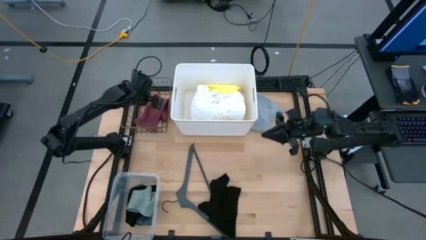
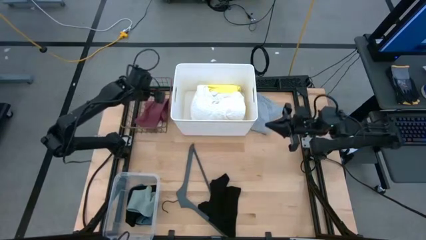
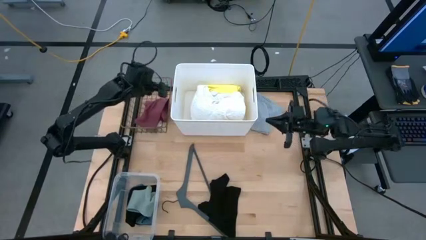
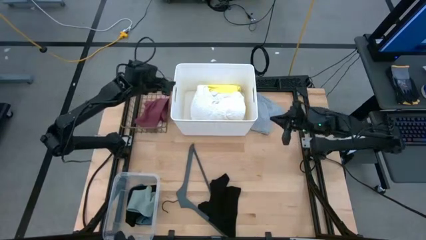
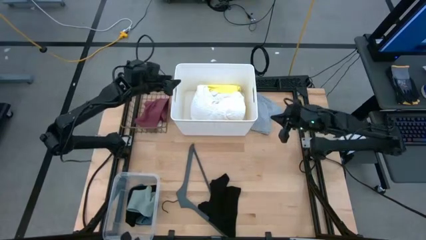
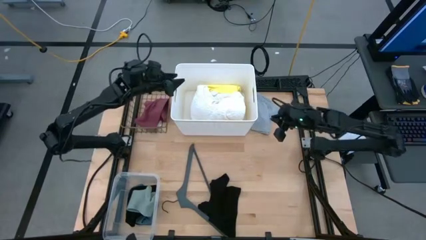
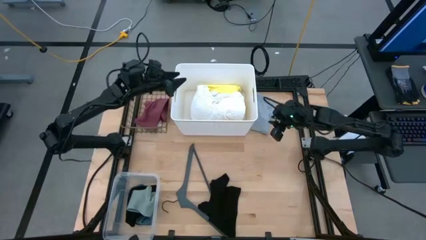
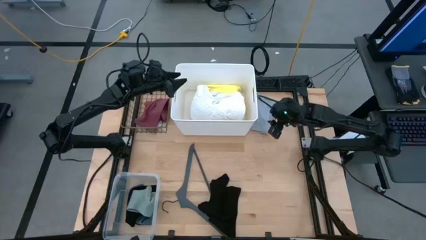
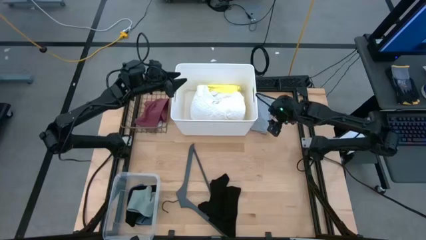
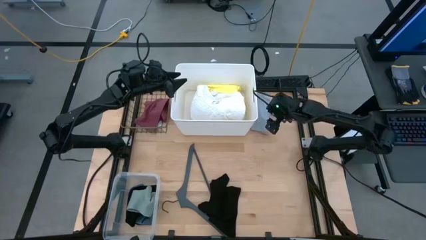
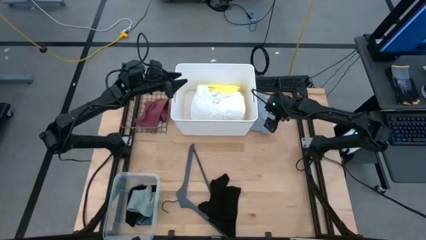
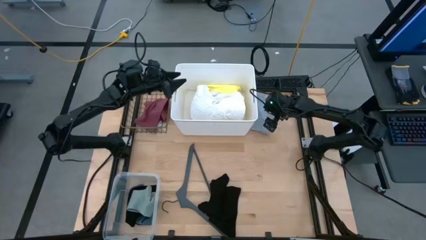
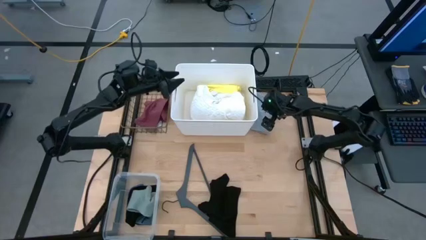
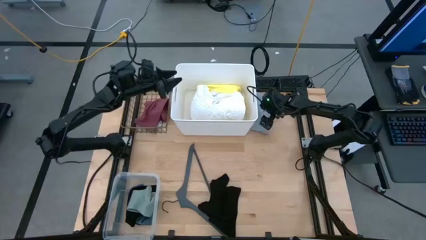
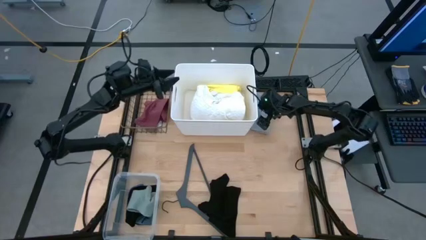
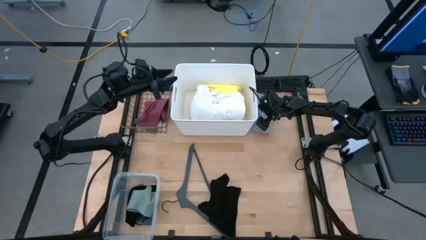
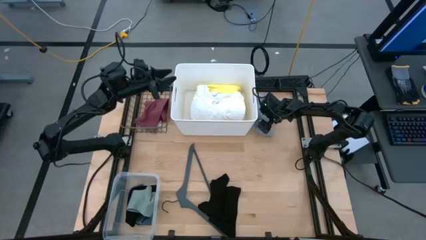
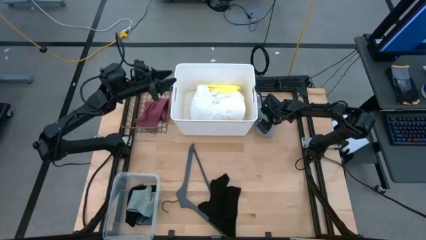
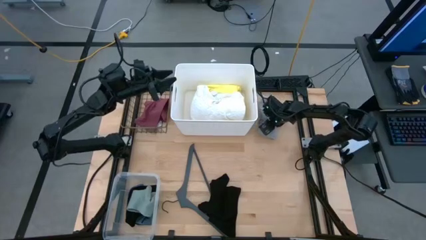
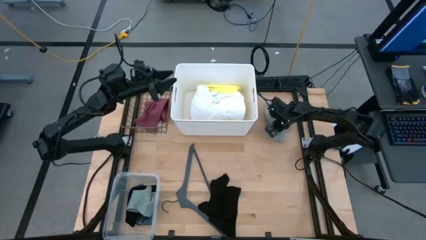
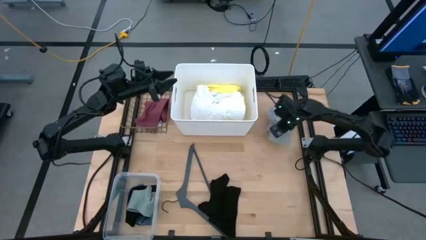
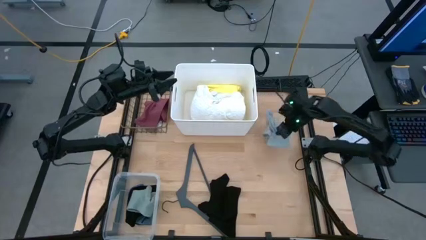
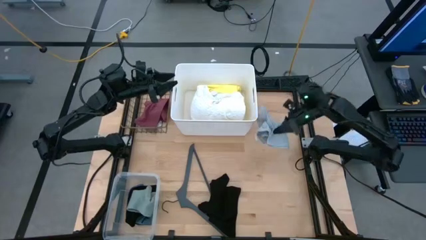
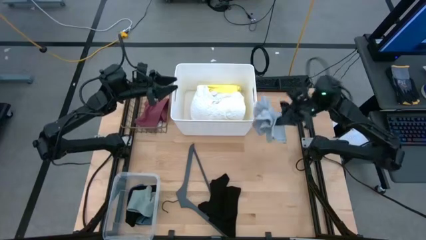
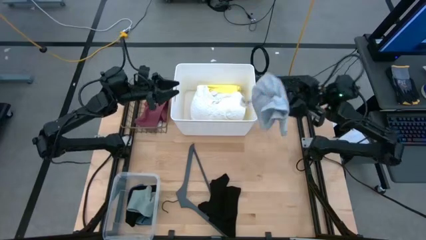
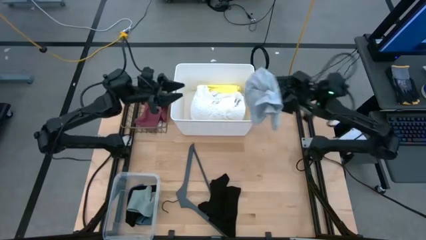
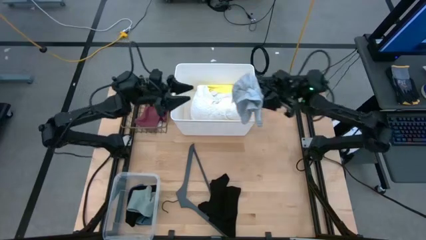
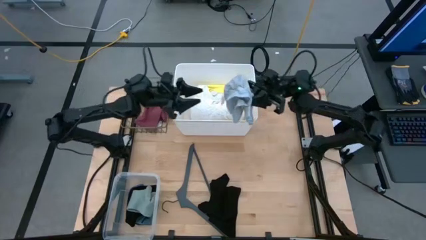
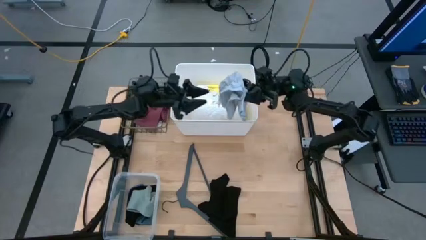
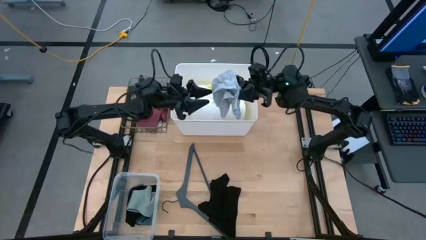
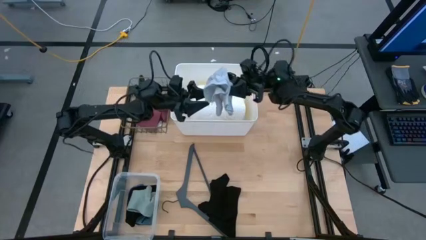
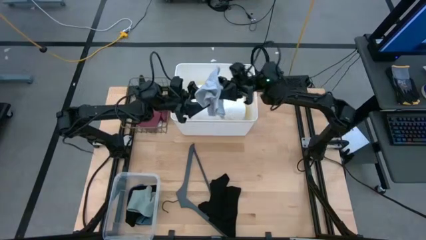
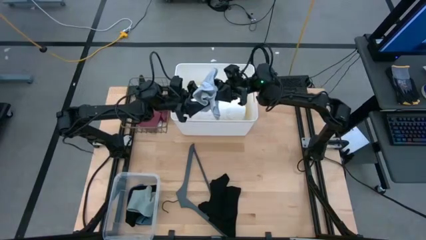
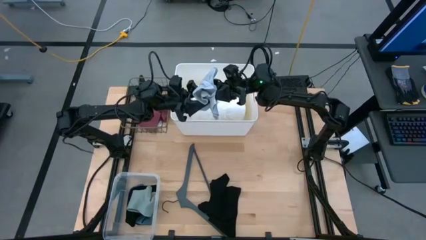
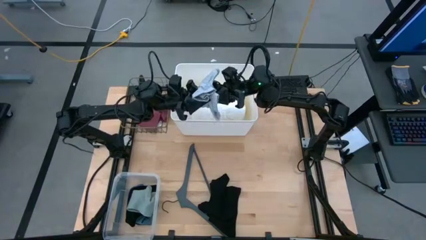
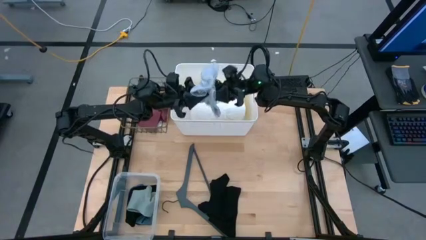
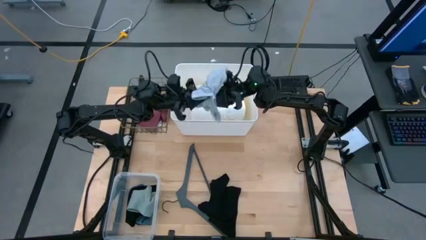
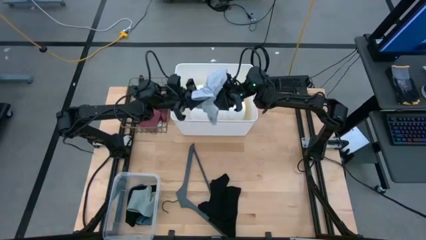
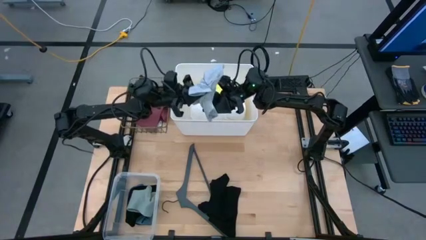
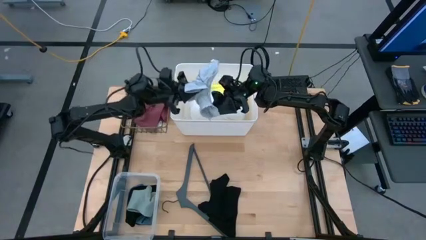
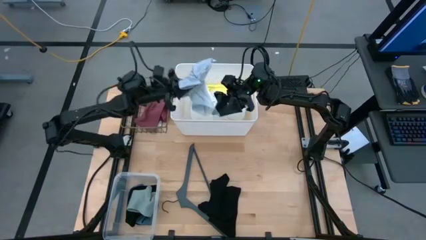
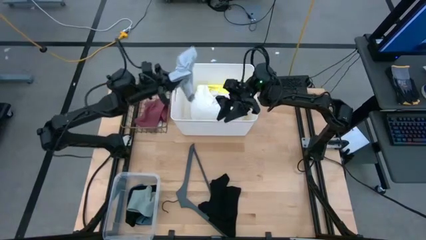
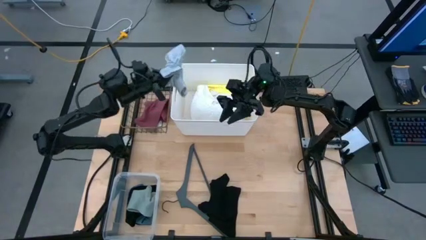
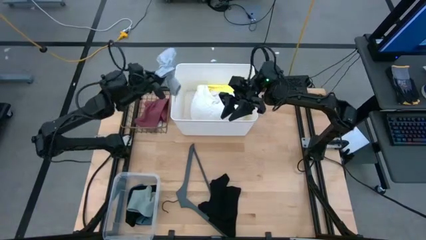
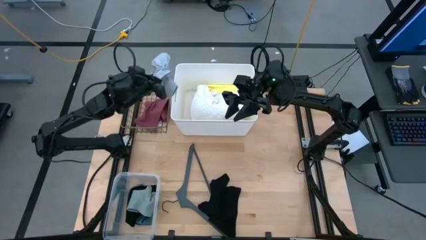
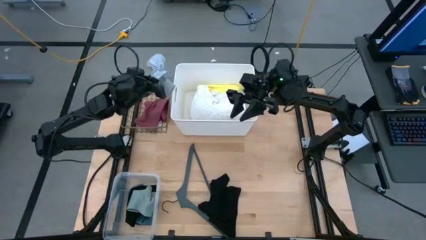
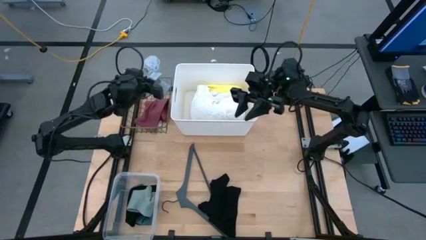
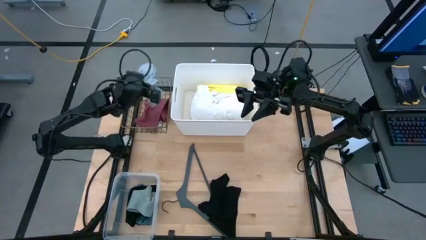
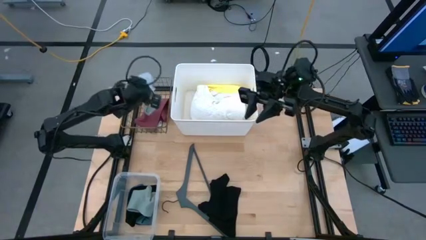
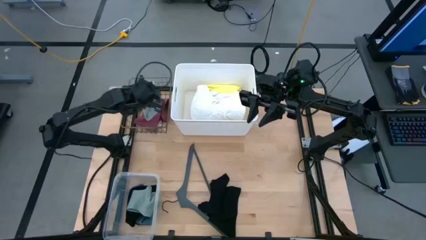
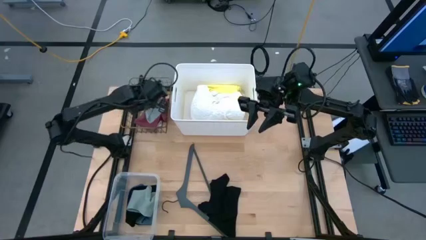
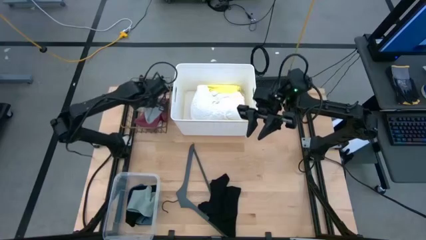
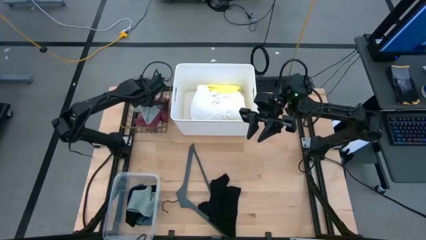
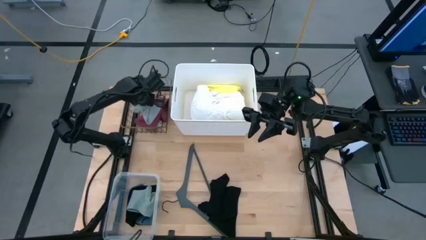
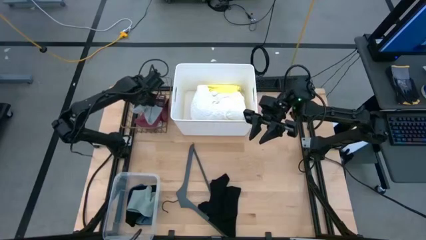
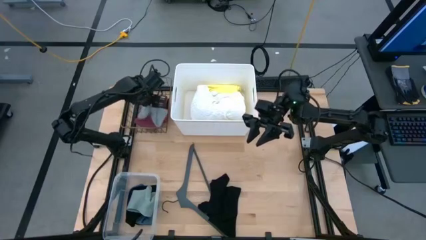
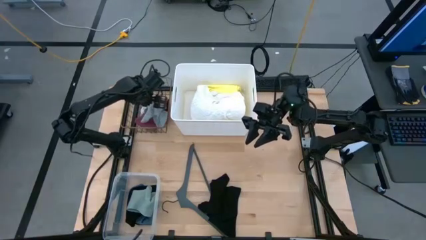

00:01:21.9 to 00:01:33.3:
Task: Pick & Place Cloths
Put the gray pants into the wire basket
